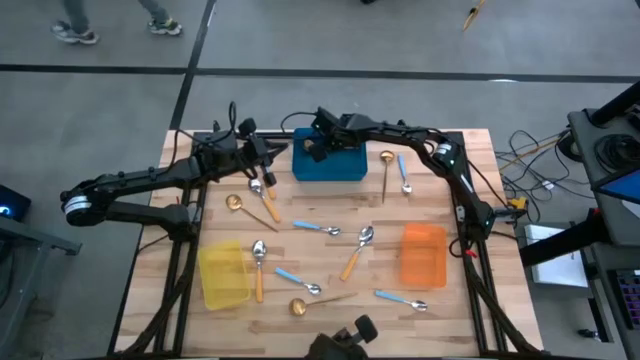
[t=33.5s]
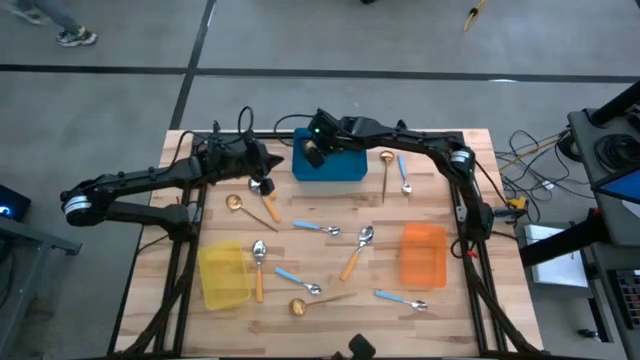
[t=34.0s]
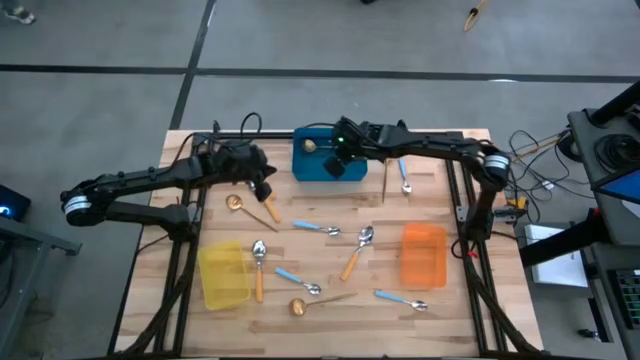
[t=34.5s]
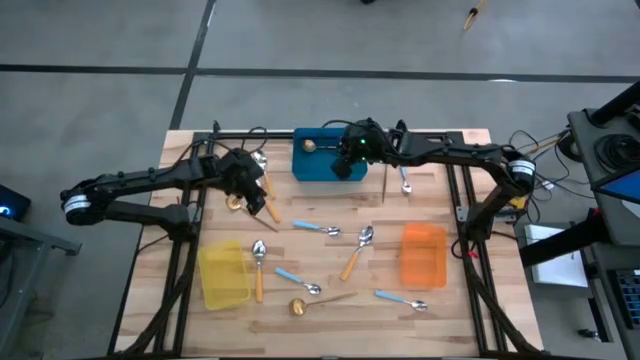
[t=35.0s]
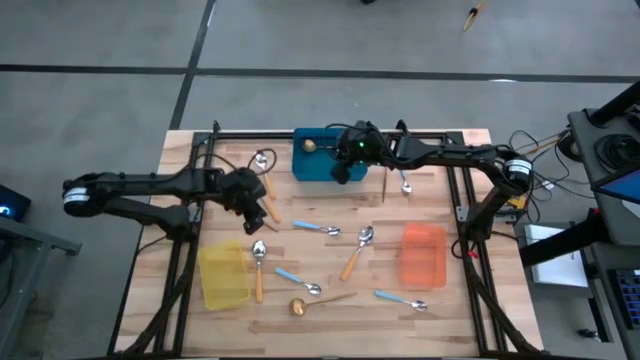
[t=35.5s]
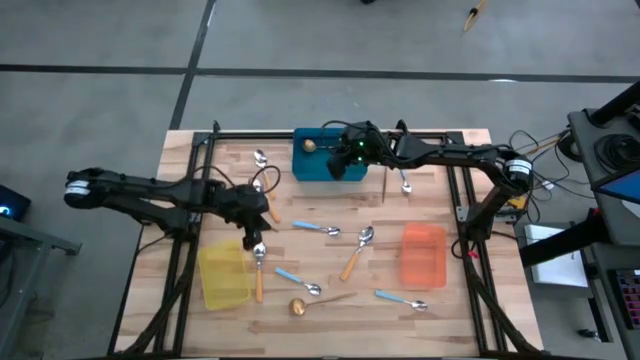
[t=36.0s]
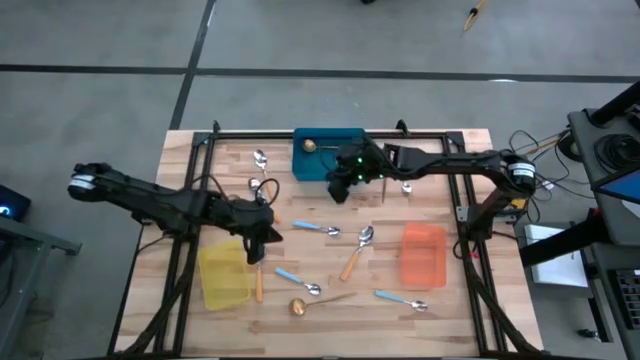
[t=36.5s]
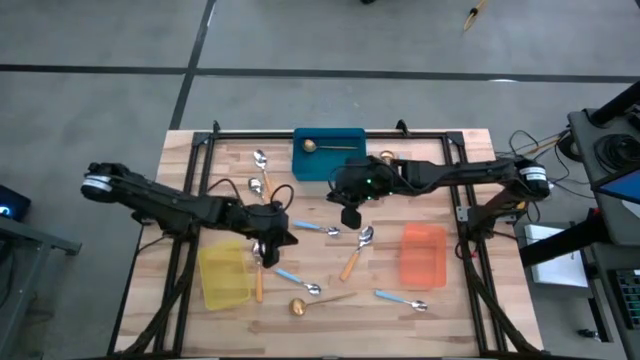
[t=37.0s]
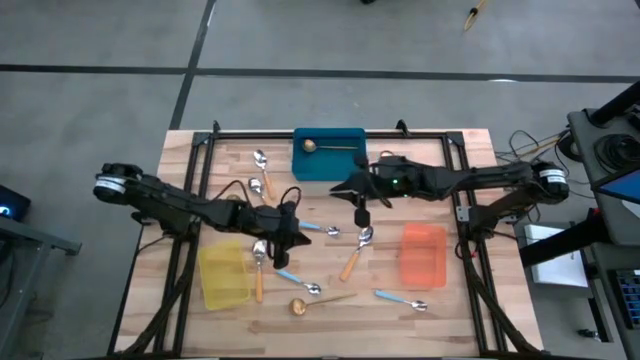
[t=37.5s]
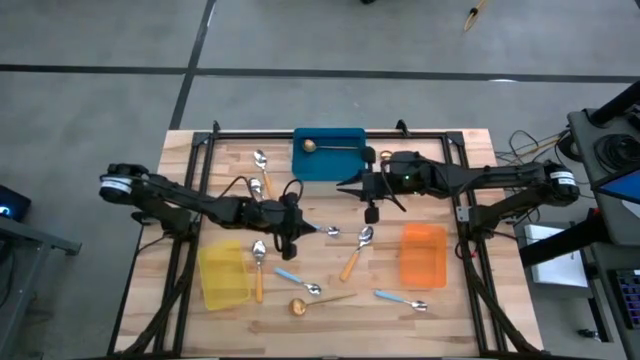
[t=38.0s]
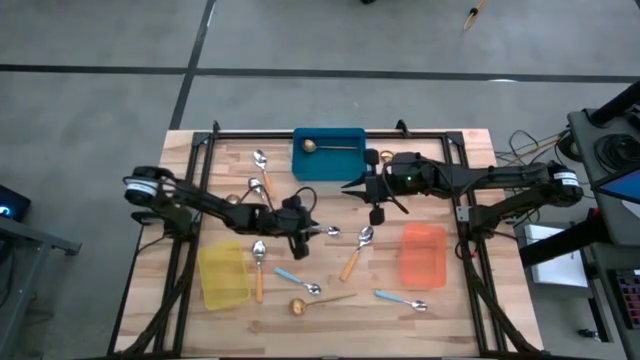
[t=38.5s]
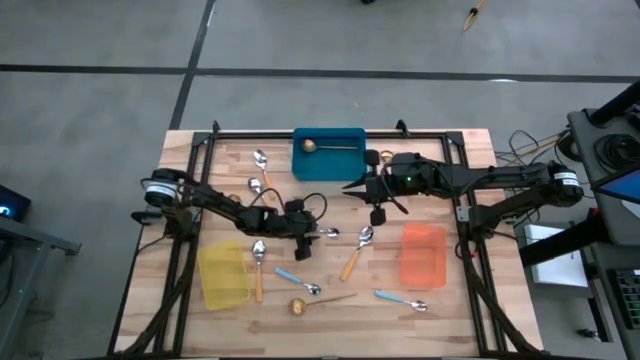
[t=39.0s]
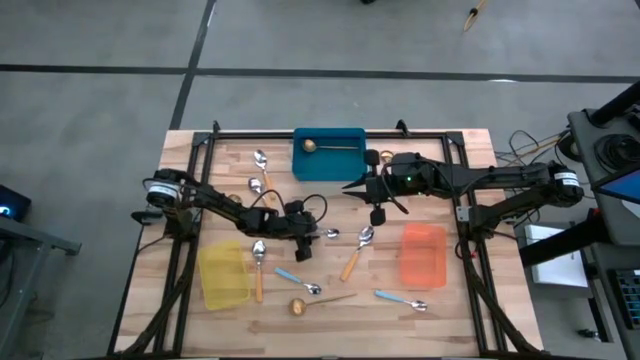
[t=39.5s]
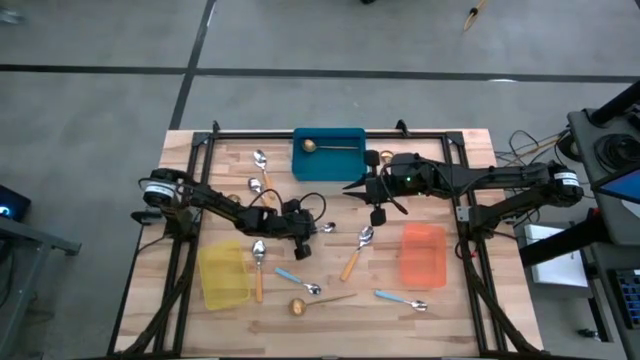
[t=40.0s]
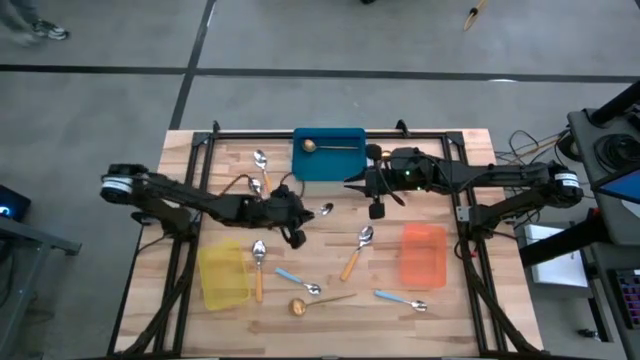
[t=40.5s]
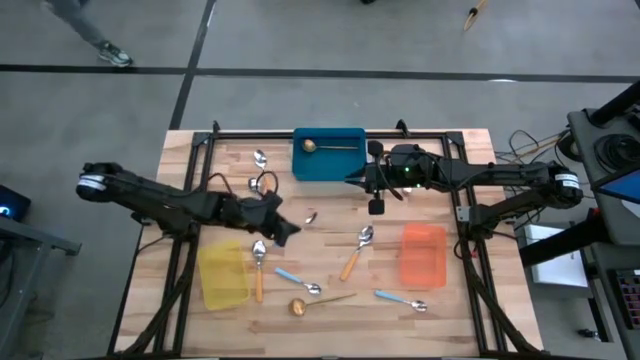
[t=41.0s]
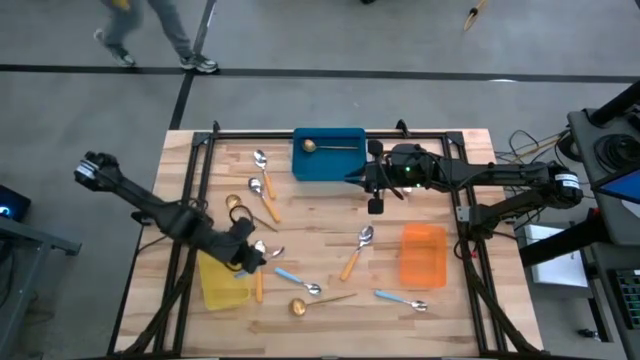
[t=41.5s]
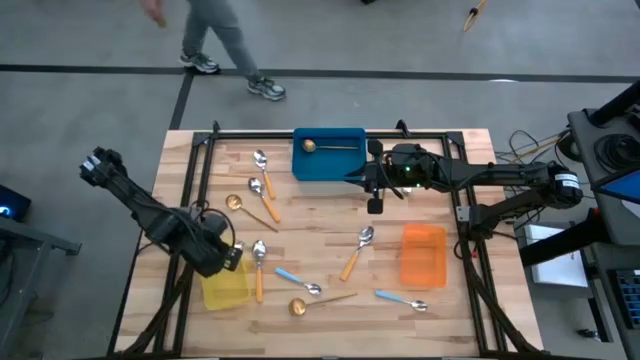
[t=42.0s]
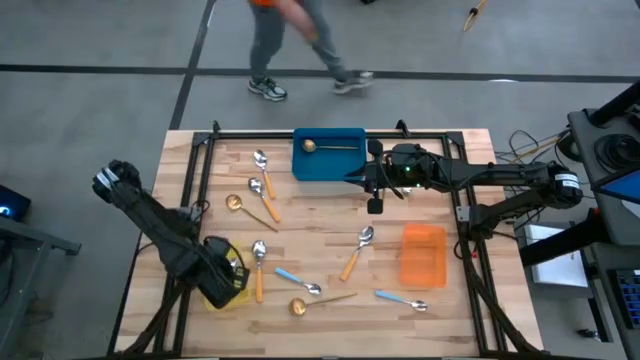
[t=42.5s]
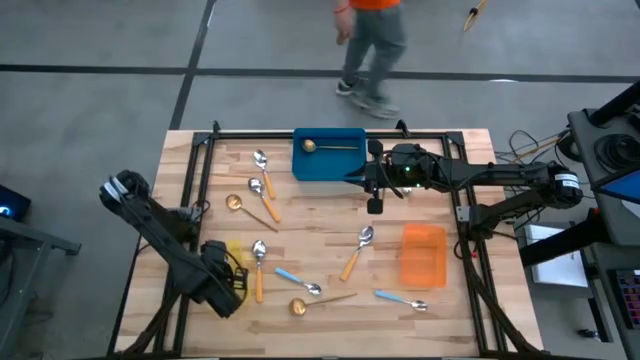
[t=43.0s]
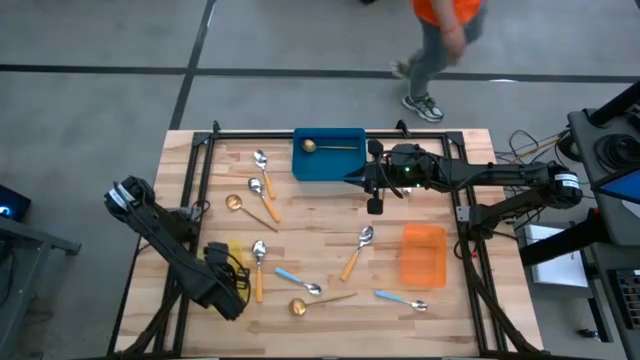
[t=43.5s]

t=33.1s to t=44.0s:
Task: Sort silverware by color (type)
Put the blue spoon into the yellow bin

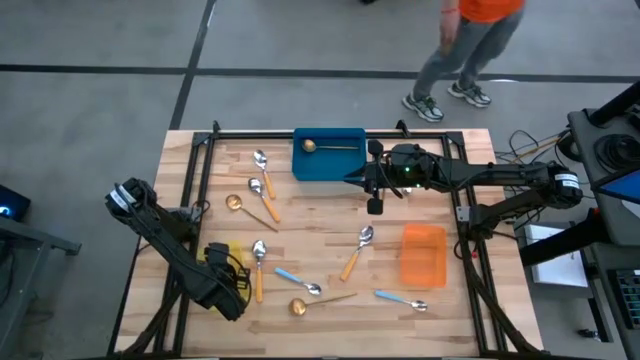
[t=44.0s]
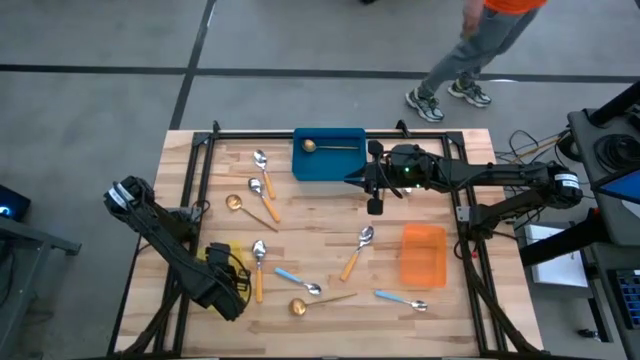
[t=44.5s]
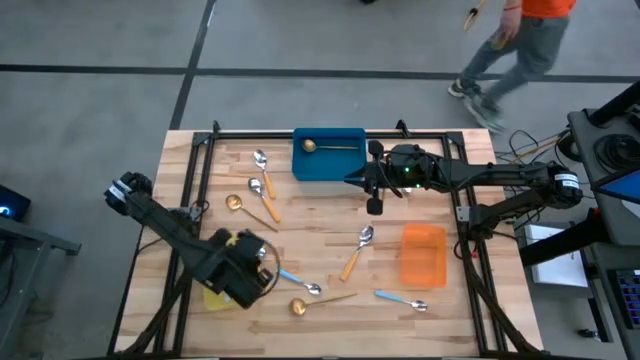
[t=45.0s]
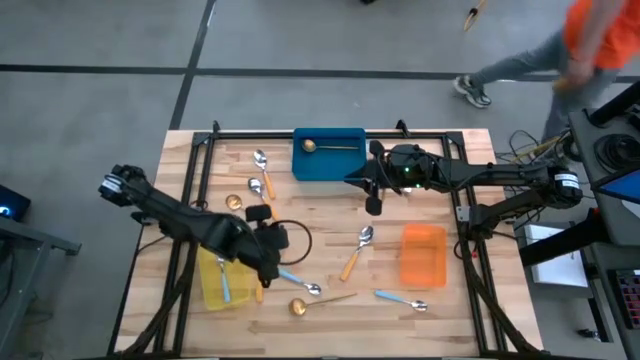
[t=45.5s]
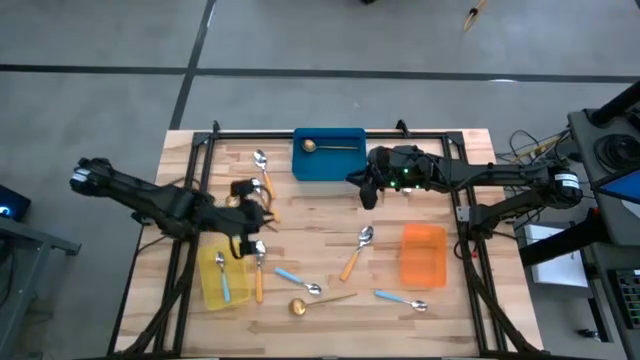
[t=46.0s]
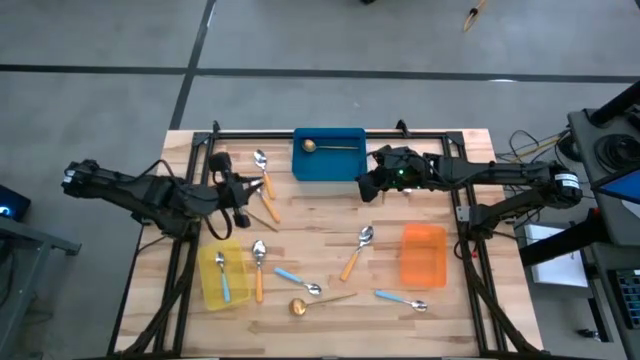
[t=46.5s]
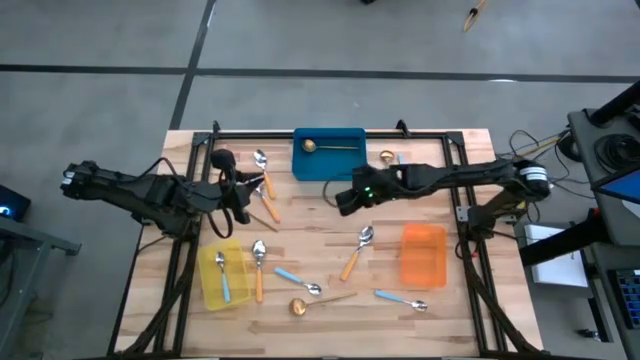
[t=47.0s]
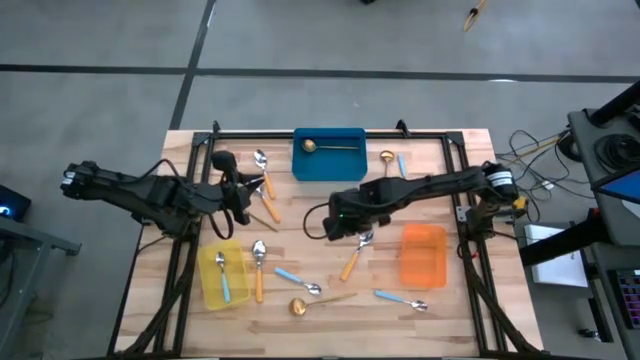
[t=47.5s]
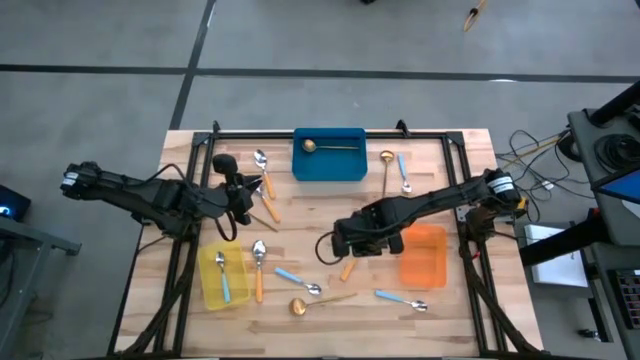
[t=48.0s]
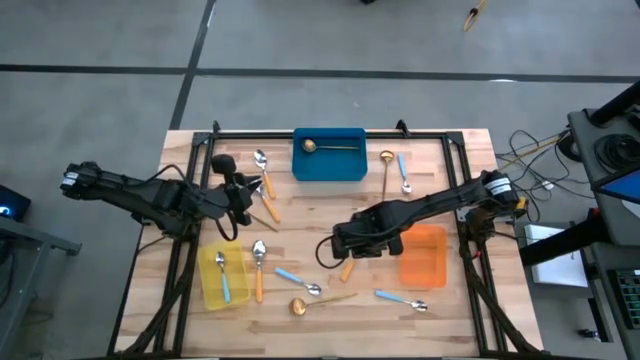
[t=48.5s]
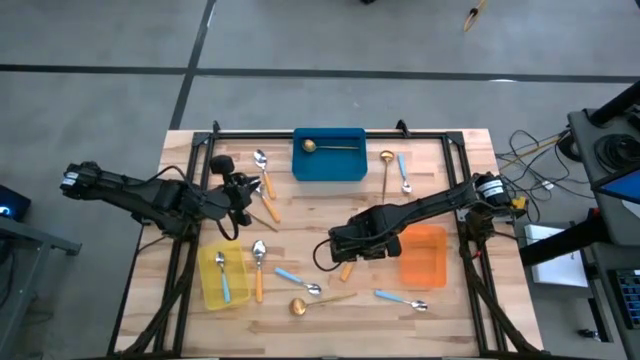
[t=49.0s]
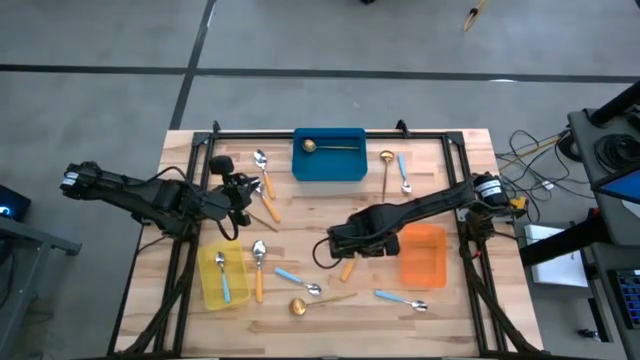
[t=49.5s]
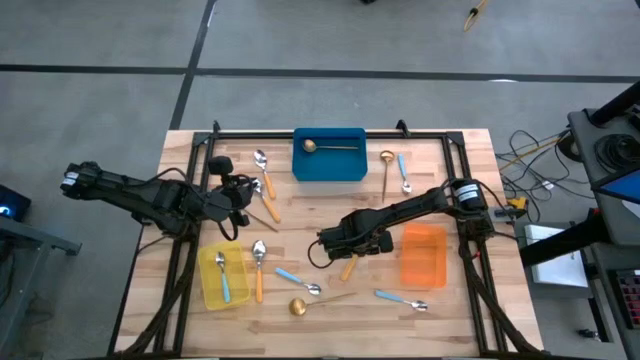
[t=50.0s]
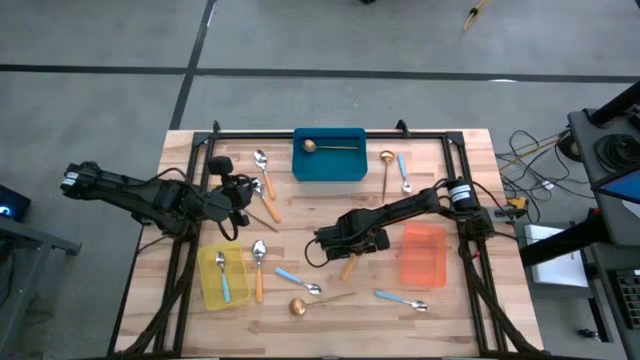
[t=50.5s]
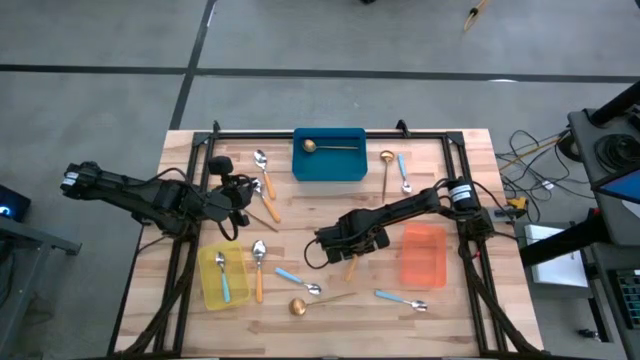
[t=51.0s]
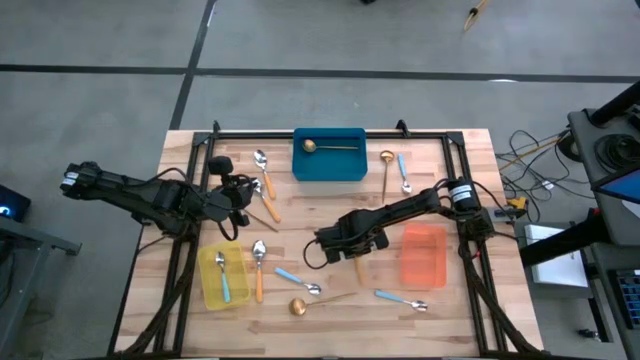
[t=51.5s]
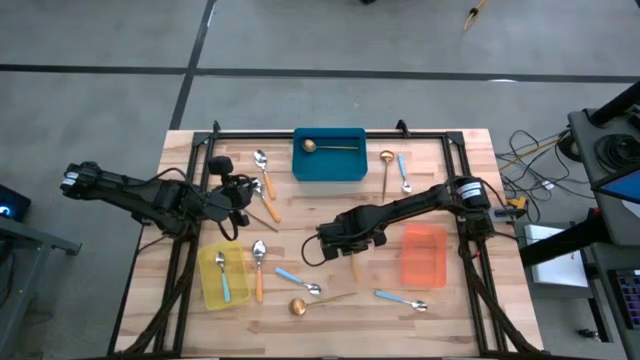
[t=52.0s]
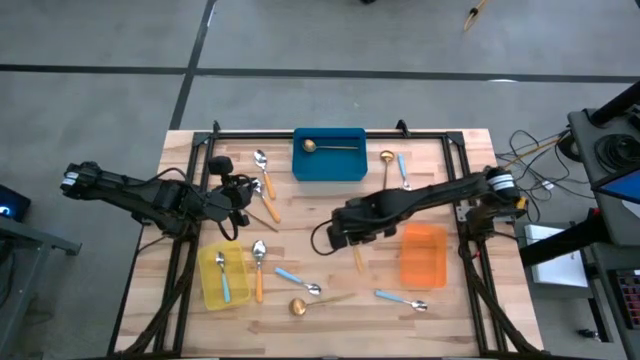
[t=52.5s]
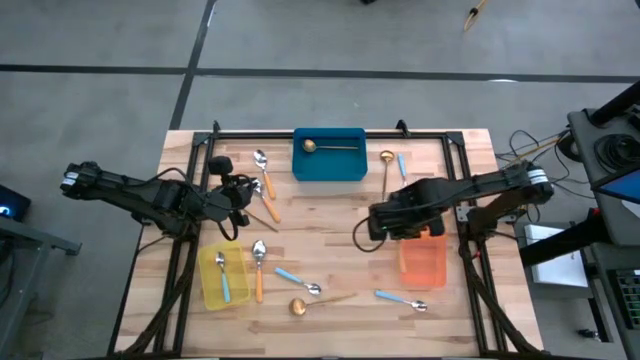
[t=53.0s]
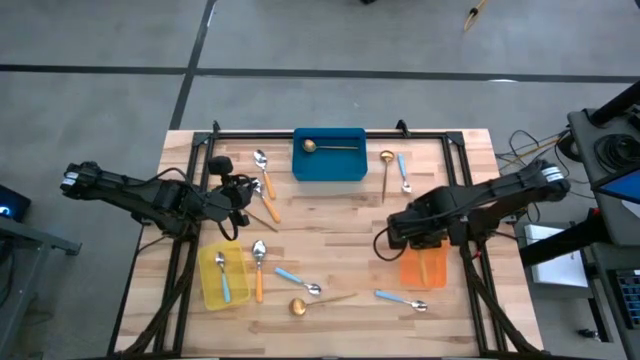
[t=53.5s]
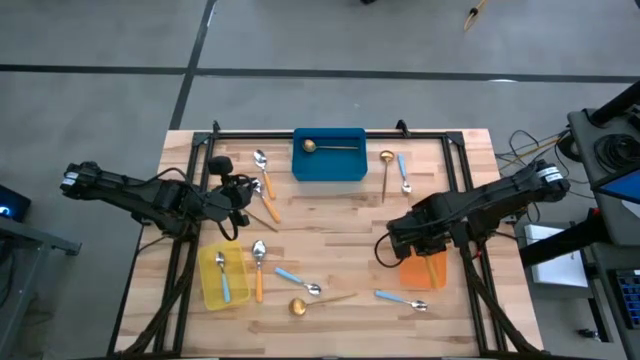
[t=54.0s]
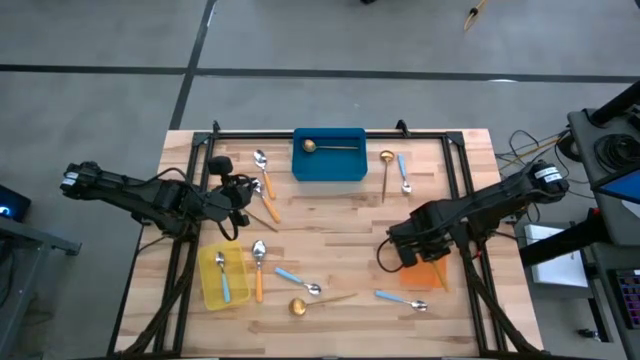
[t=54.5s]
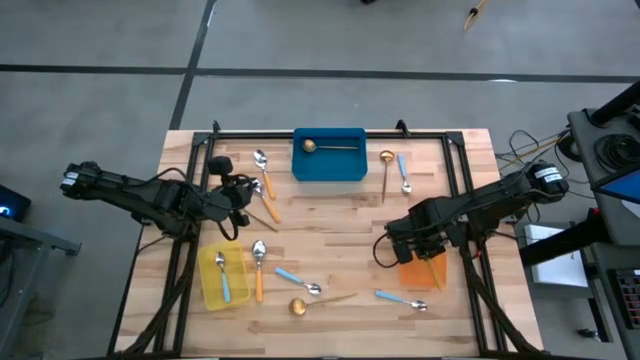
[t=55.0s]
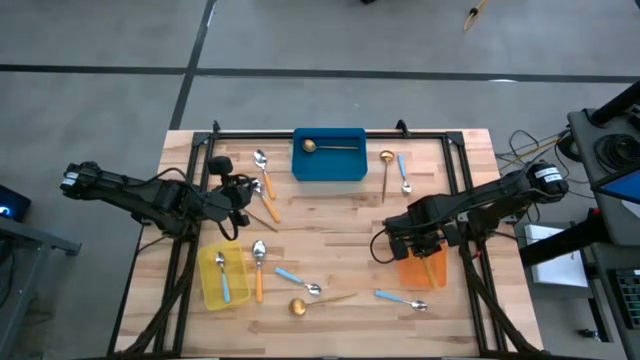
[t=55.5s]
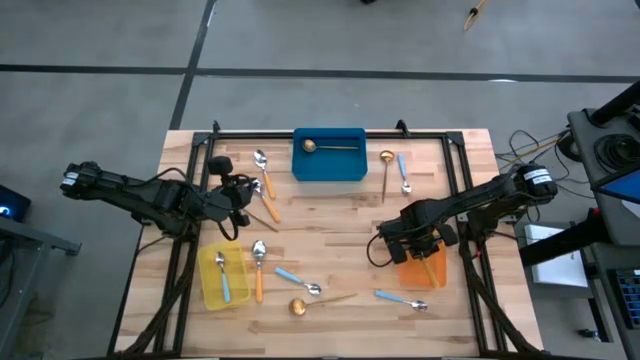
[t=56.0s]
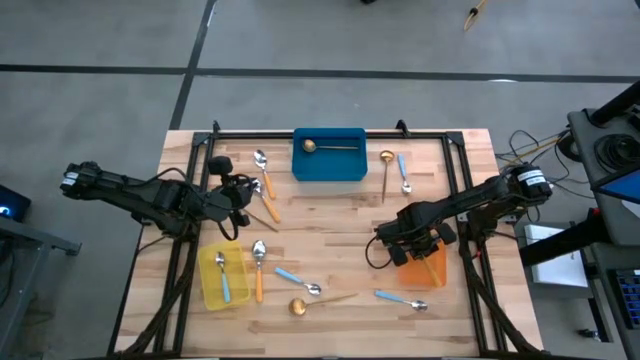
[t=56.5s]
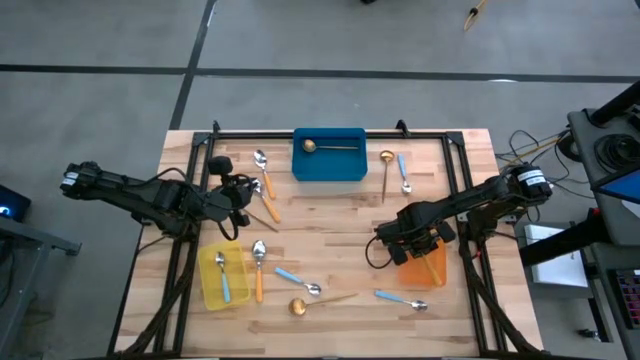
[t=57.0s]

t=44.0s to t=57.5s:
Put the orange spoon into the orange bin
